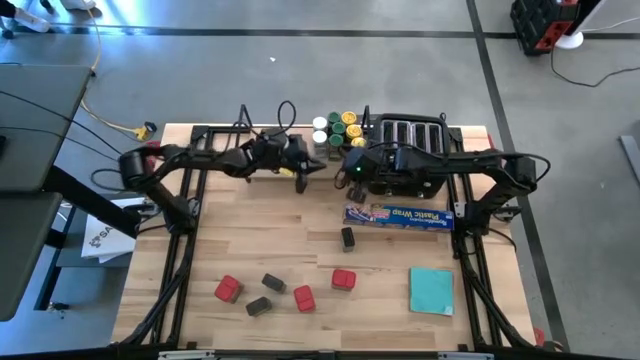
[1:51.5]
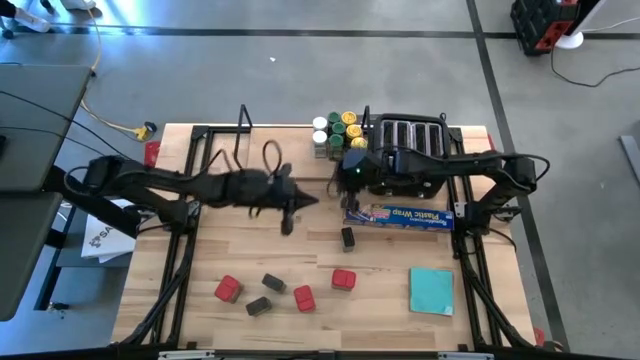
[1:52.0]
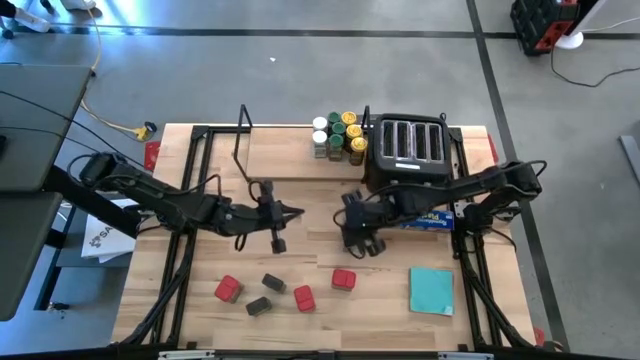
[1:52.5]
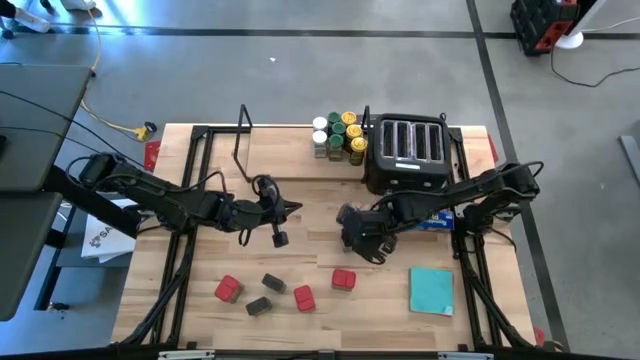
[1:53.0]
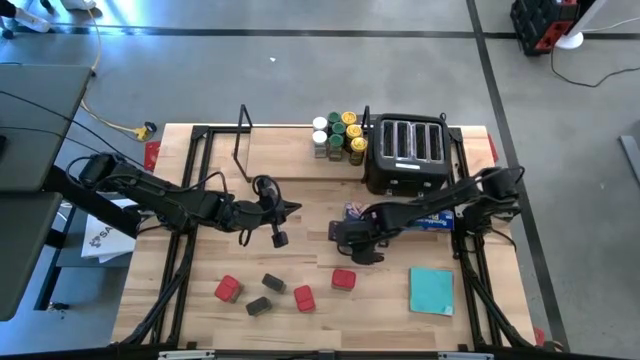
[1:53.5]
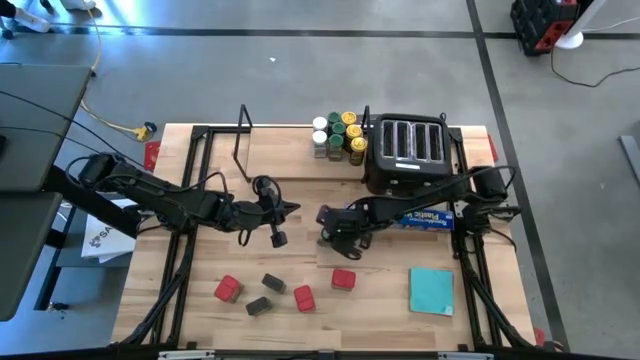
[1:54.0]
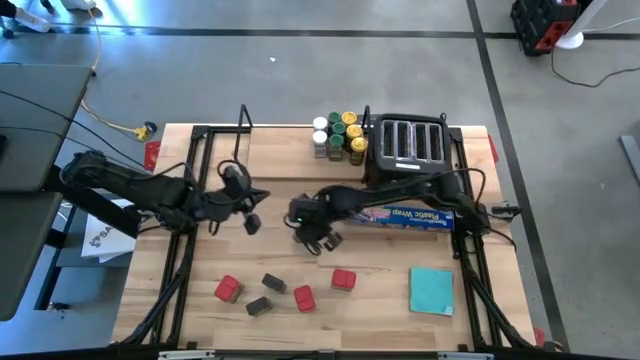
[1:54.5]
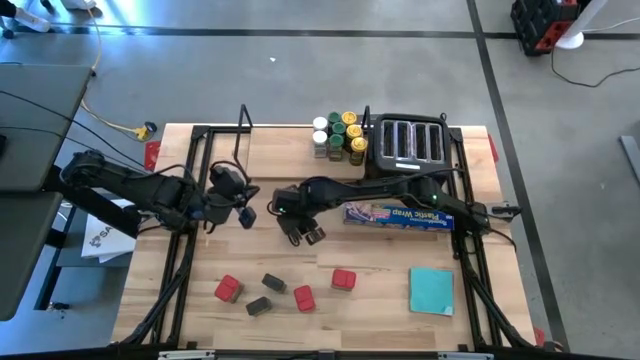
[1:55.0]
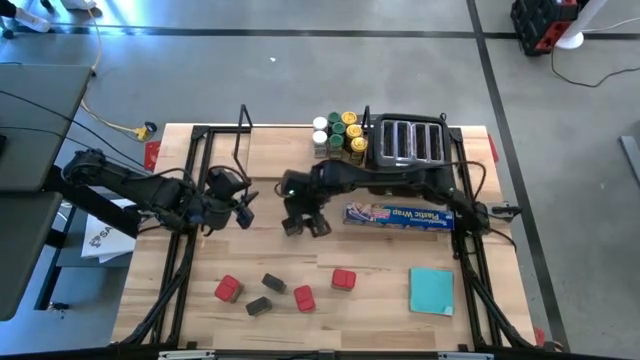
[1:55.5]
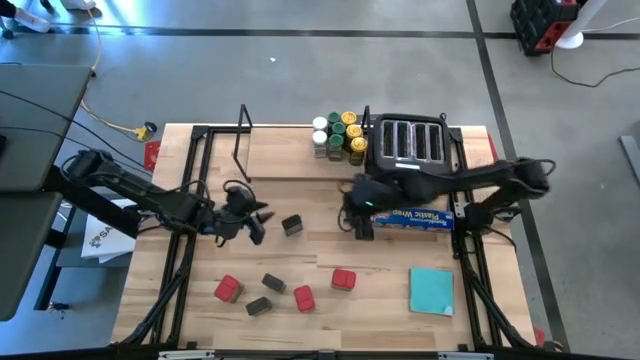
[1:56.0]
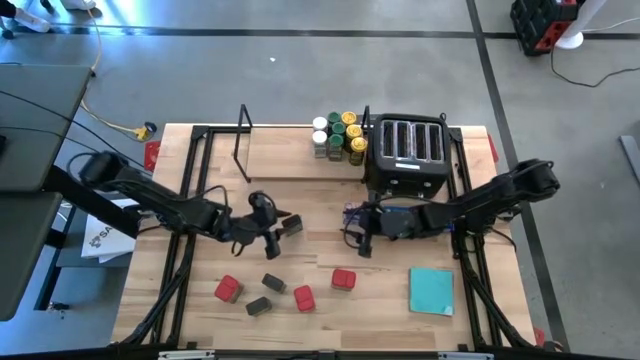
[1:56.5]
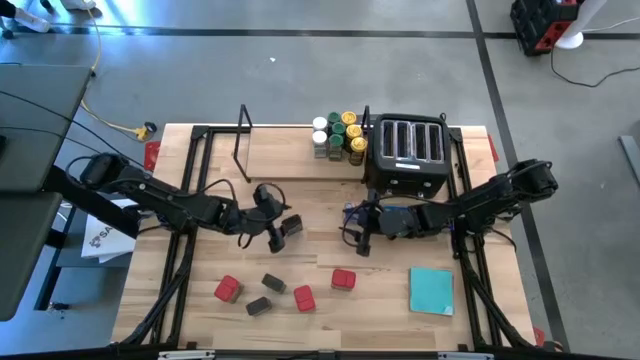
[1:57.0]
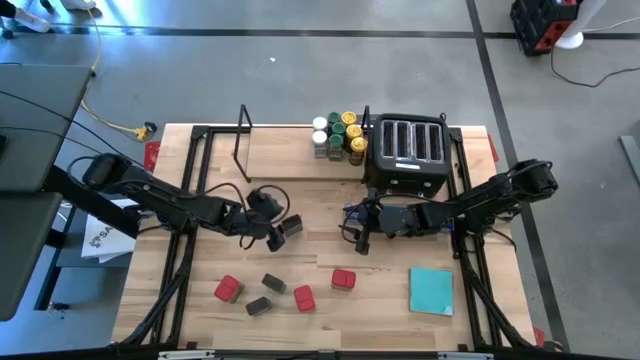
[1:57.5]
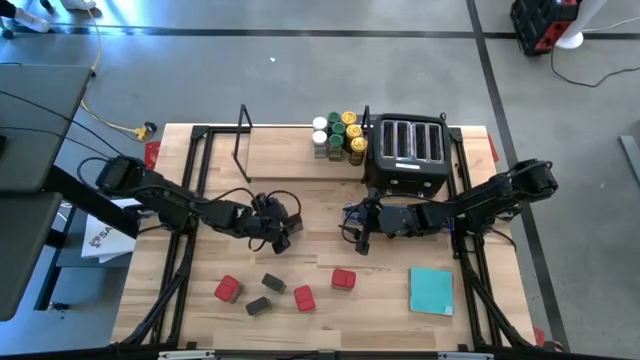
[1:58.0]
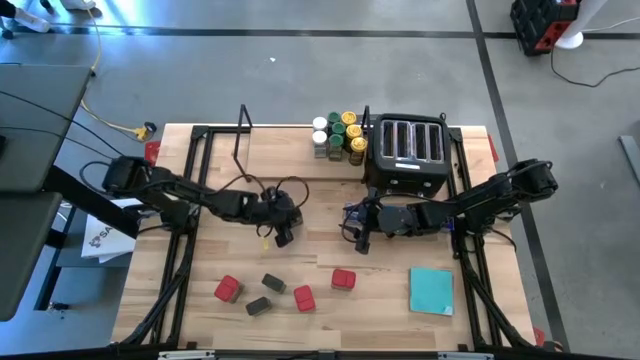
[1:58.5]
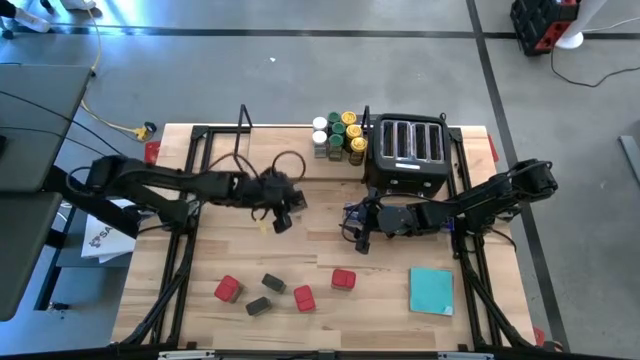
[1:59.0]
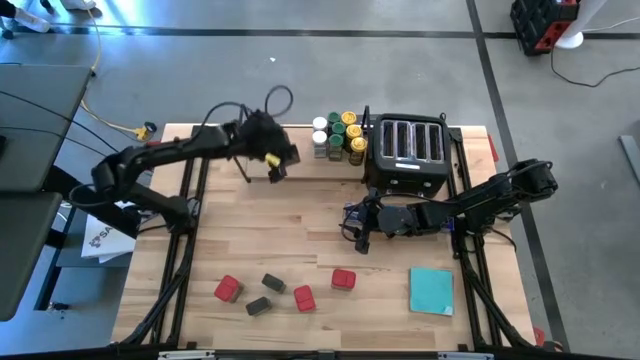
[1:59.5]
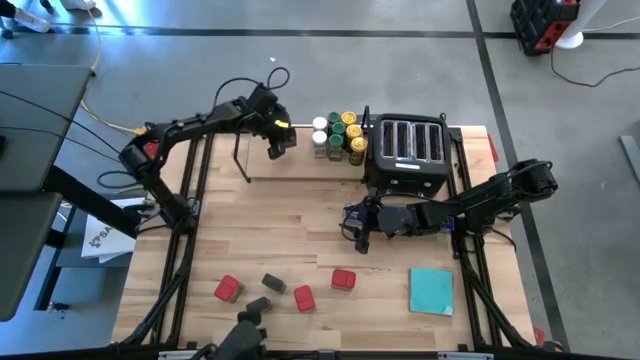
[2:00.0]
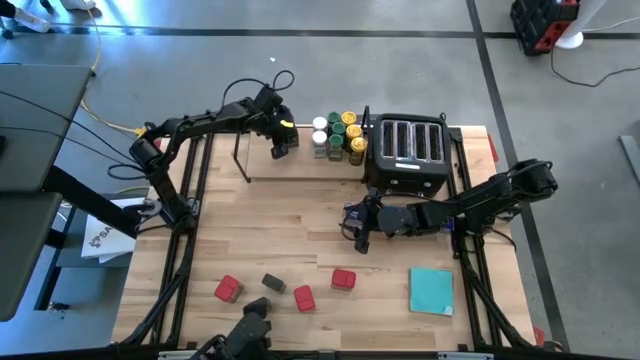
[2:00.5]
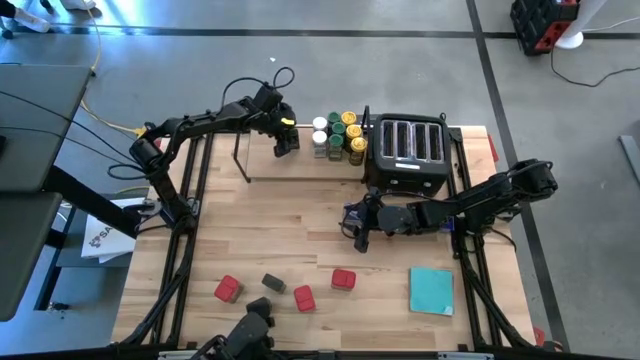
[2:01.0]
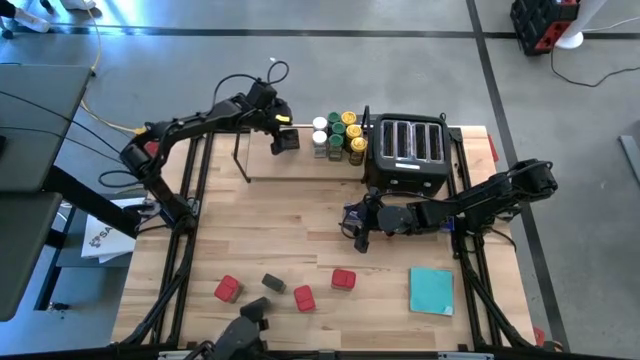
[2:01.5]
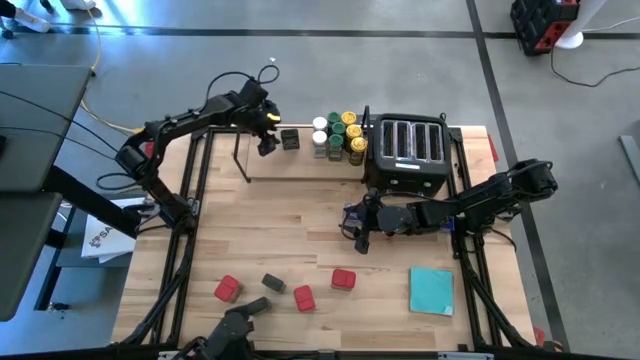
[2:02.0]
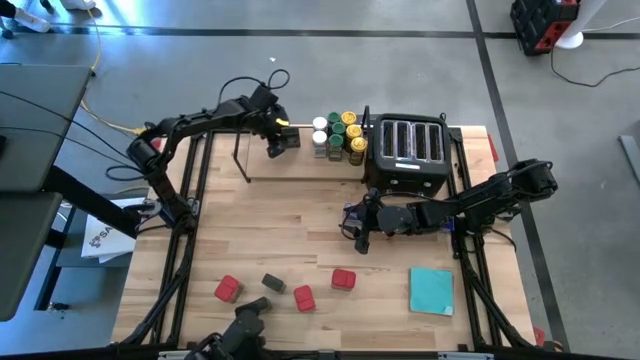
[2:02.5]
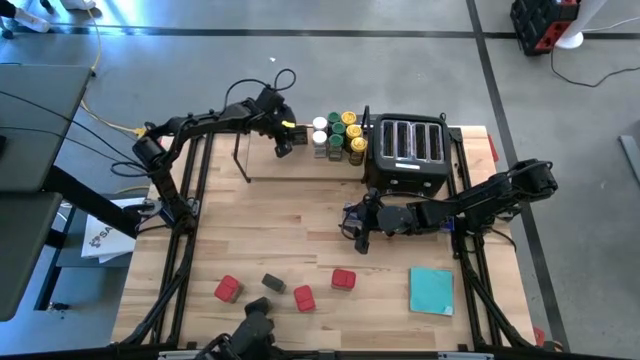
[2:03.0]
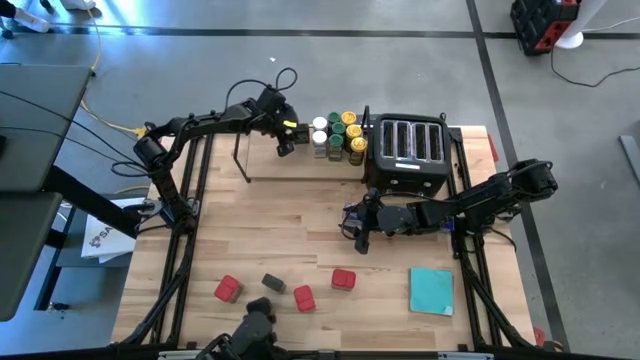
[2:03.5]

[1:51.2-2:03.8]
Task: Shelf spices
Put the top right black seasoning can on the shelf

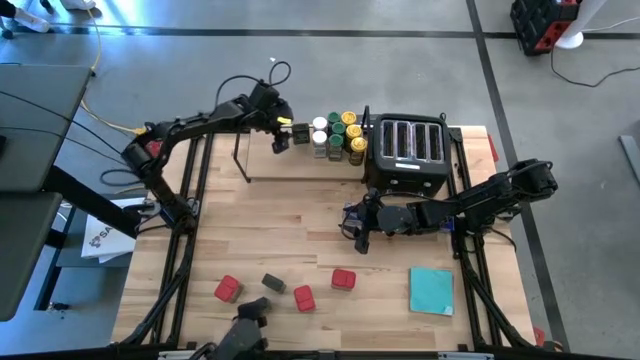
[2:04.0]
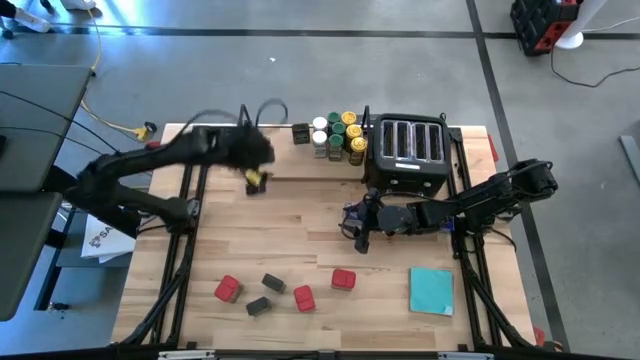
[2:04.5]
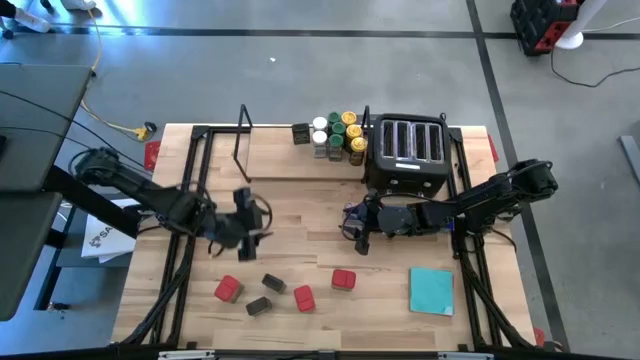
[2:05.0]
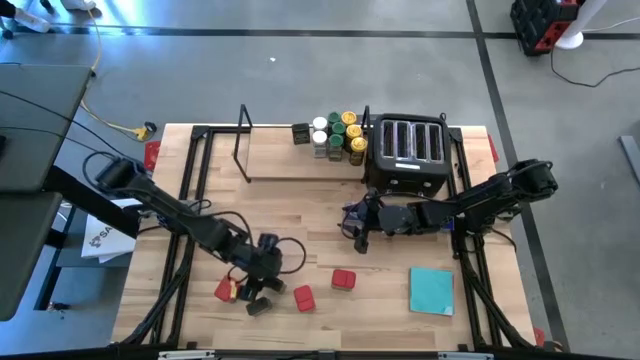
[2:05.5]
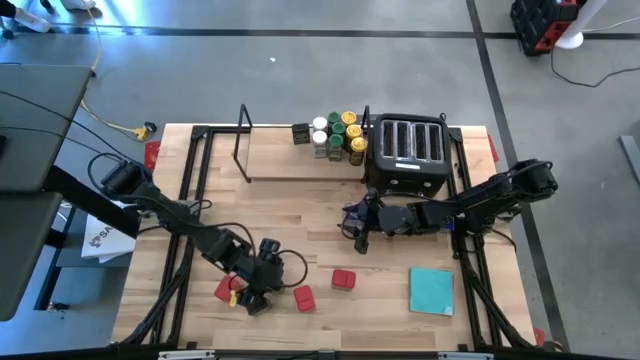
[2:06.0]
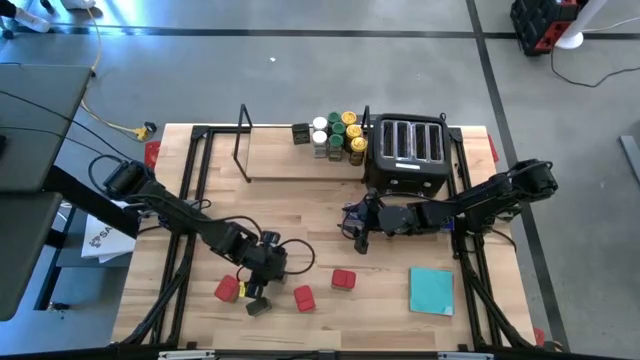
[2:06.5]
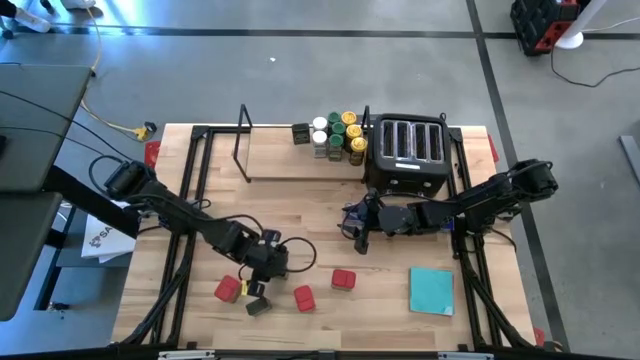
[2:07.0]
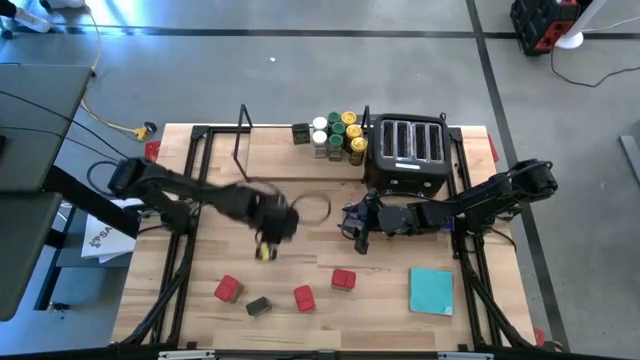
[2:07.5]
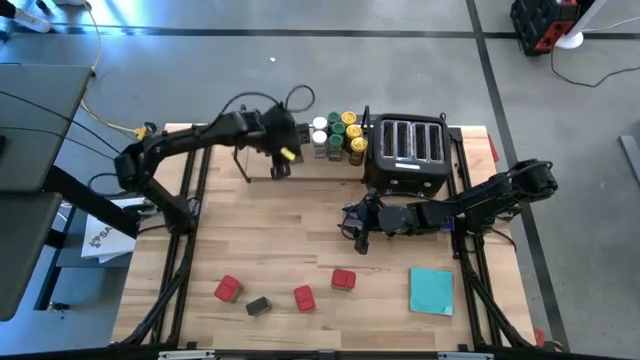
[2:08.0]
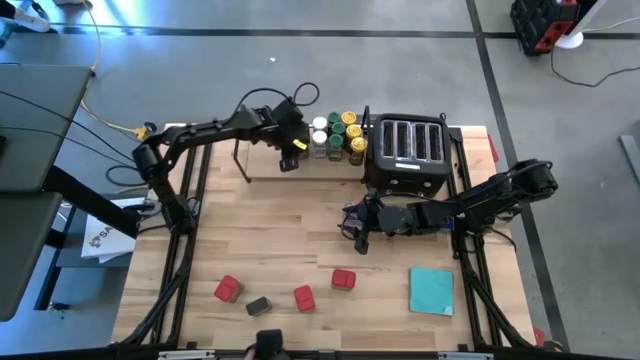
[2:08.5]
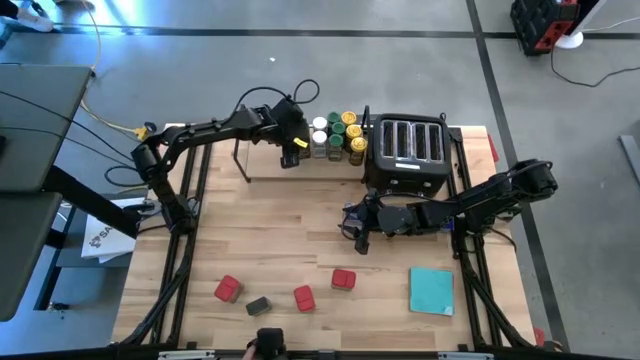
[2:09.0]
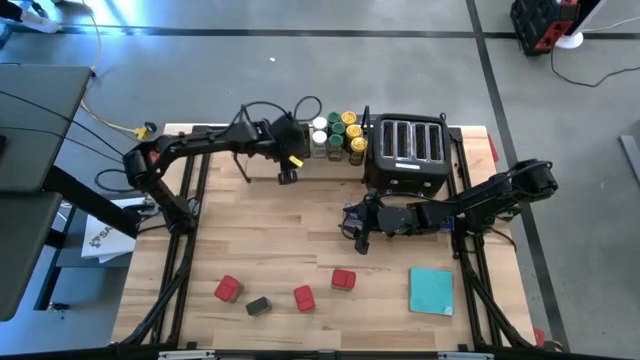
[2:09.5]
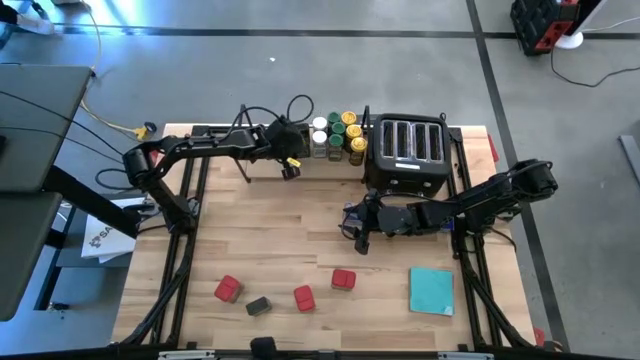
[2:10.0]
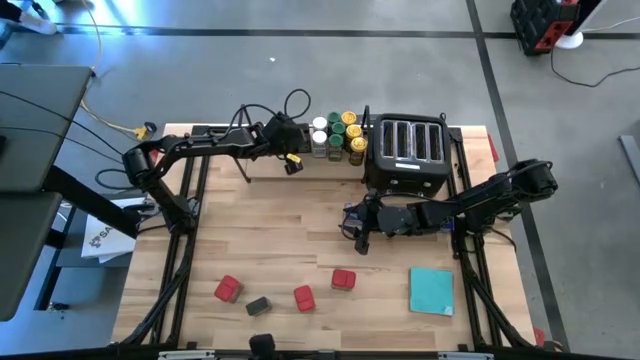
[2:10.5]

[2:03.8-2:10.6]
Put the top black seasoning can on the shelf aligned with the other black seasoning can

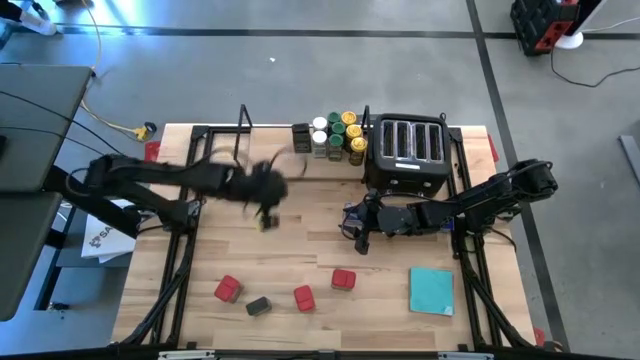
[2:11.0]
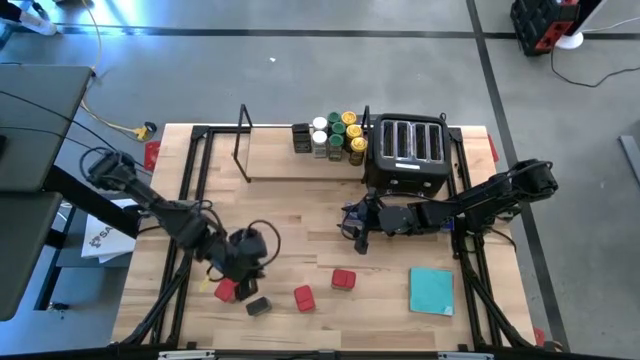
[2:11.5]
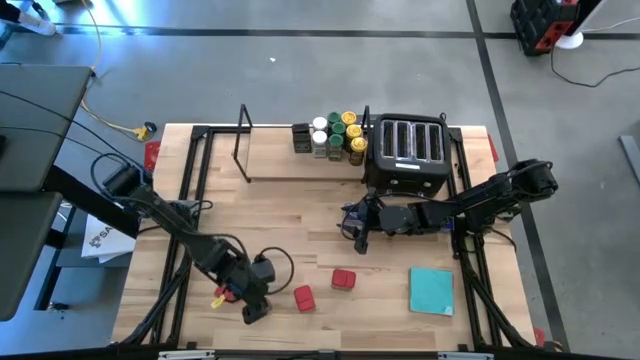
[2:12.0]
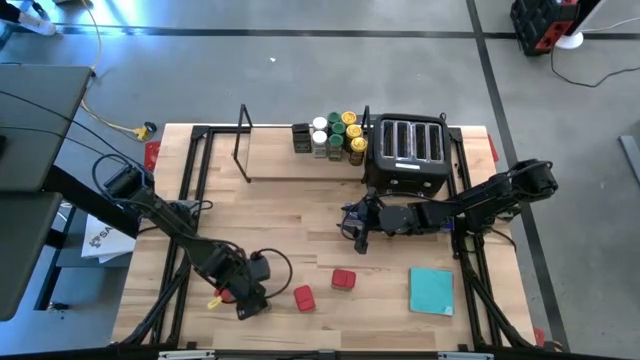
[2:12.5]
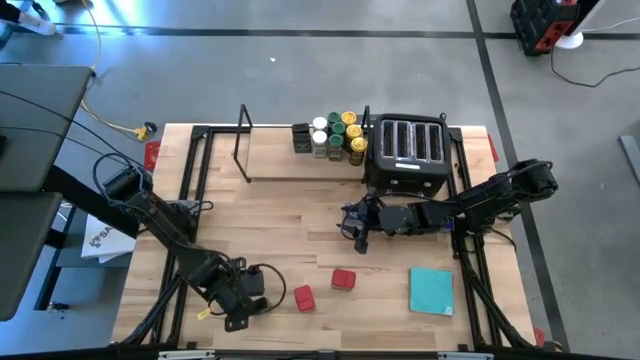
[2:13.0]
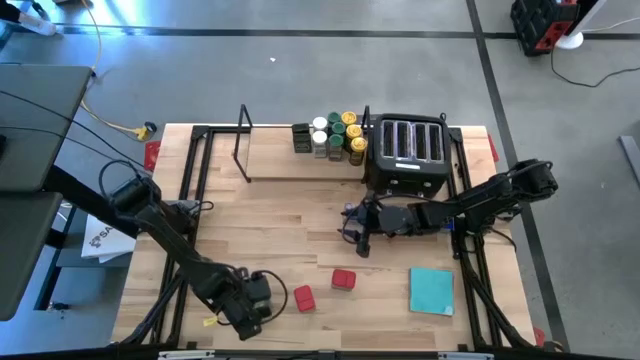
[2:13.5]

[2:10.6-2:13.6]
Put the black seasoning can on the shelf aligned with the other black seasoning can
